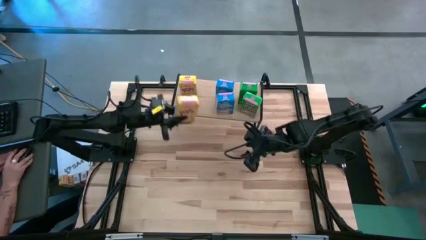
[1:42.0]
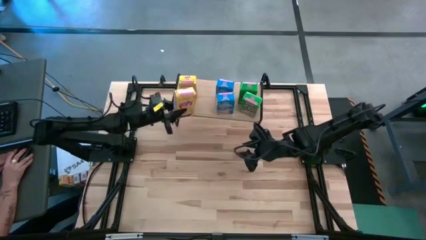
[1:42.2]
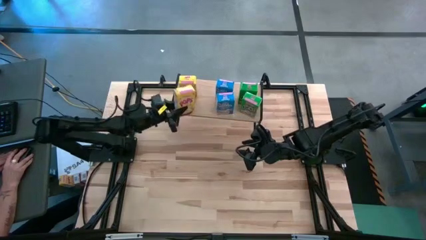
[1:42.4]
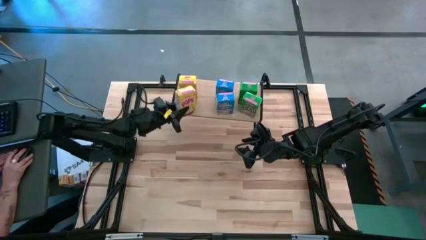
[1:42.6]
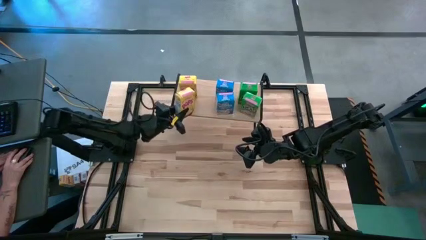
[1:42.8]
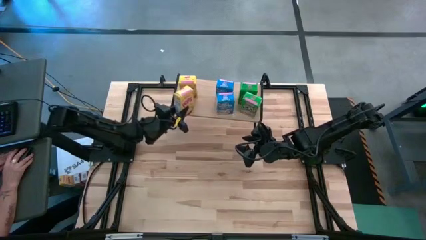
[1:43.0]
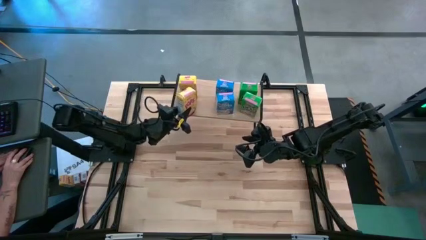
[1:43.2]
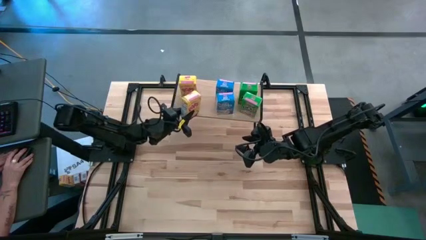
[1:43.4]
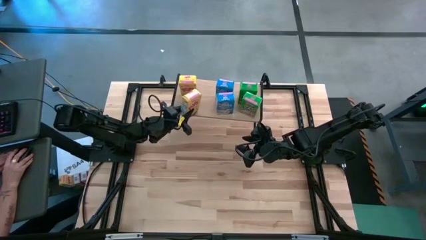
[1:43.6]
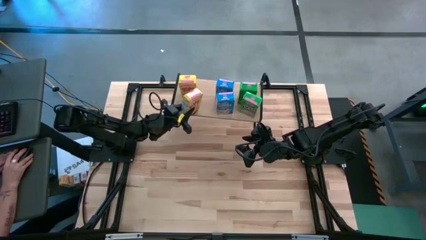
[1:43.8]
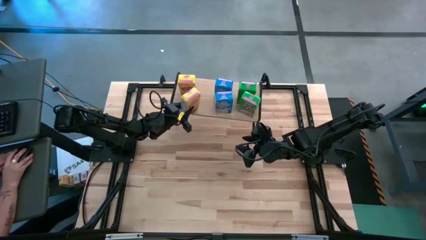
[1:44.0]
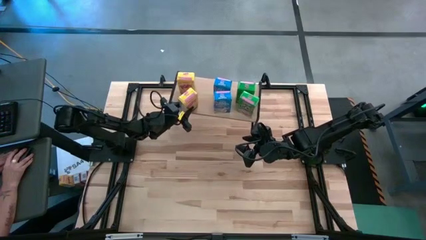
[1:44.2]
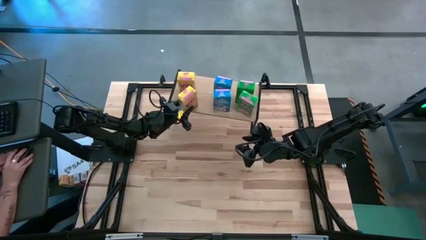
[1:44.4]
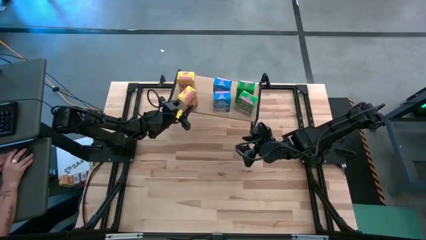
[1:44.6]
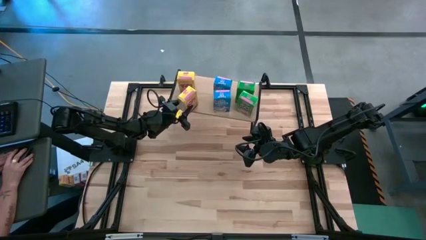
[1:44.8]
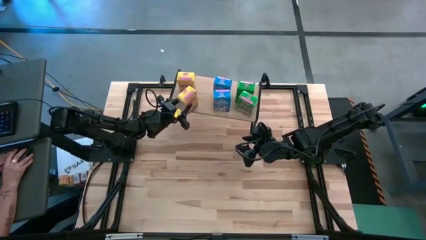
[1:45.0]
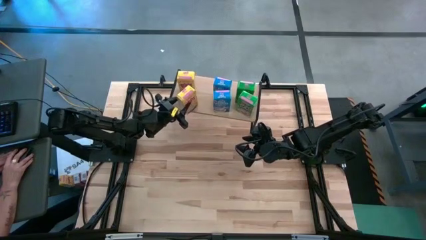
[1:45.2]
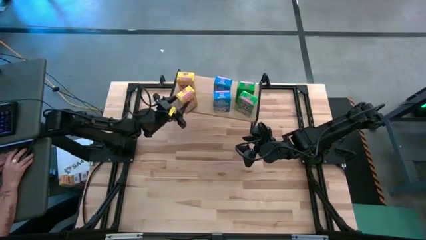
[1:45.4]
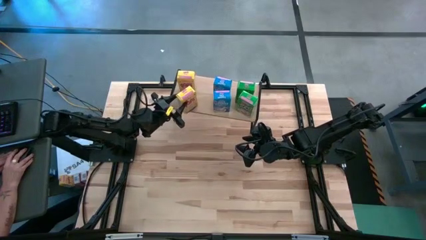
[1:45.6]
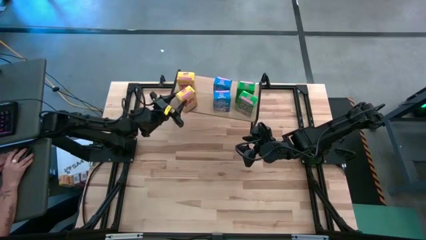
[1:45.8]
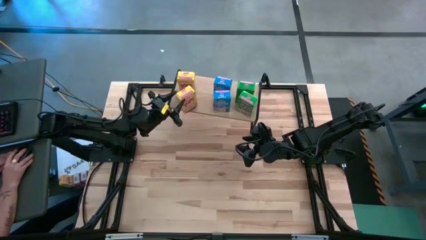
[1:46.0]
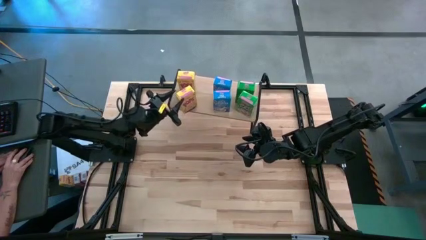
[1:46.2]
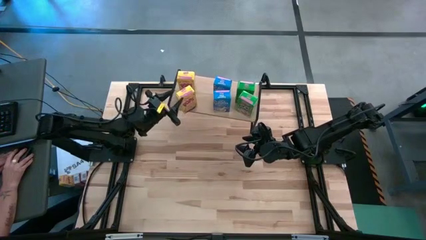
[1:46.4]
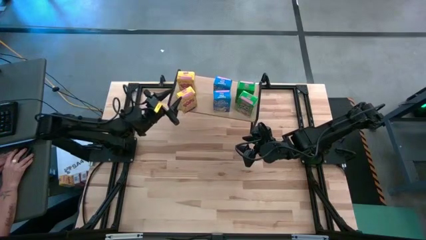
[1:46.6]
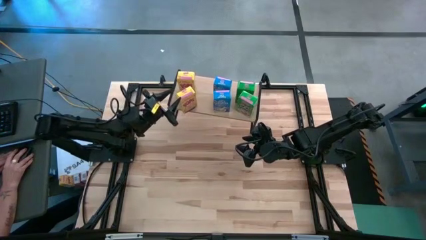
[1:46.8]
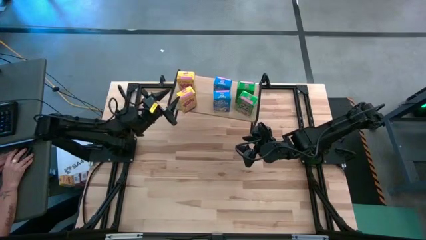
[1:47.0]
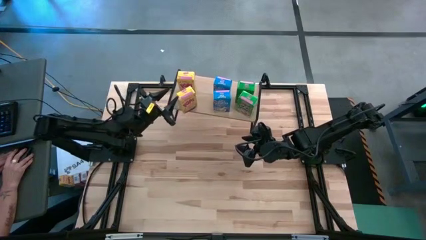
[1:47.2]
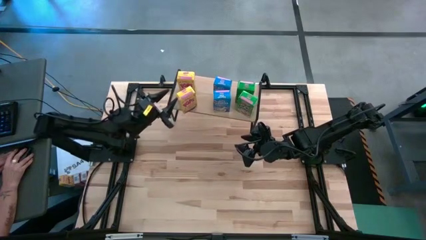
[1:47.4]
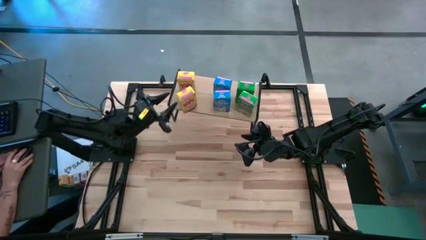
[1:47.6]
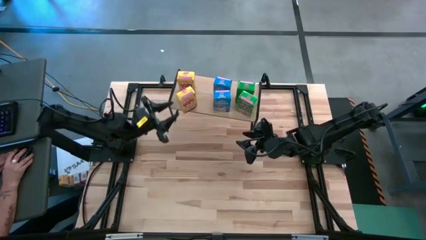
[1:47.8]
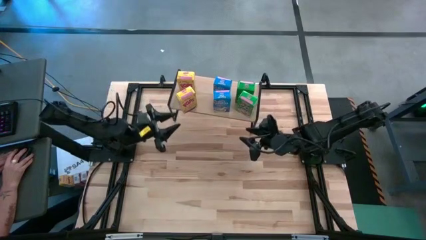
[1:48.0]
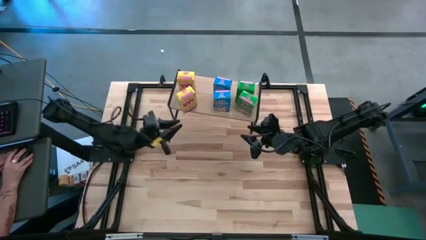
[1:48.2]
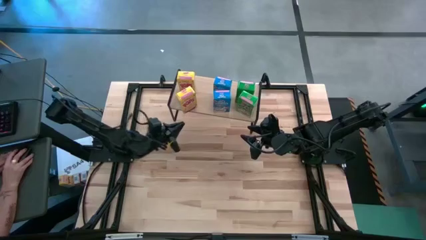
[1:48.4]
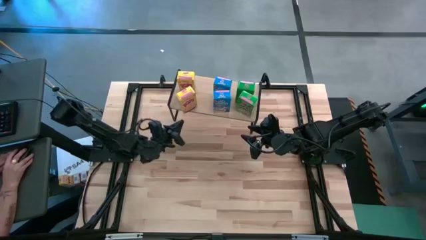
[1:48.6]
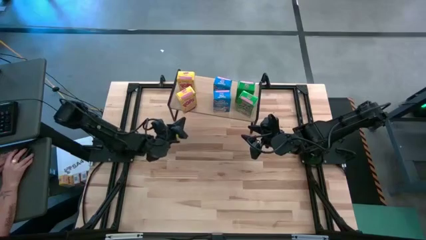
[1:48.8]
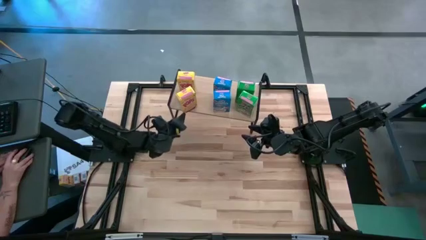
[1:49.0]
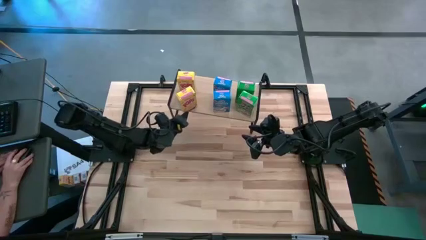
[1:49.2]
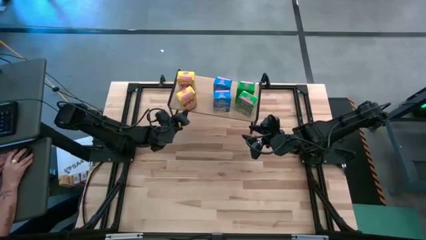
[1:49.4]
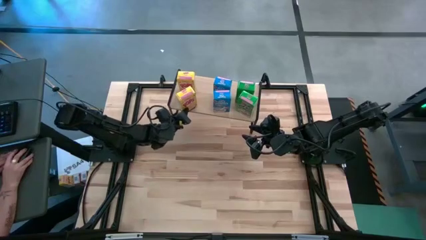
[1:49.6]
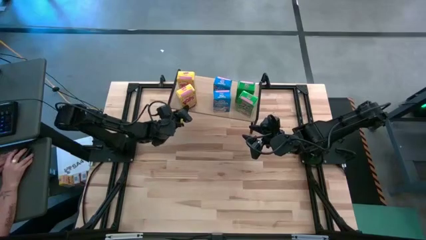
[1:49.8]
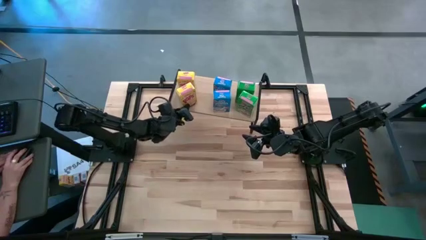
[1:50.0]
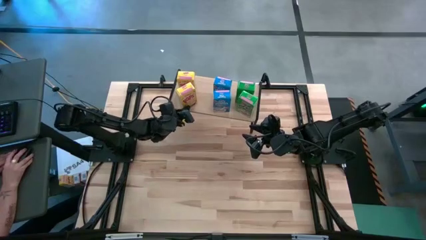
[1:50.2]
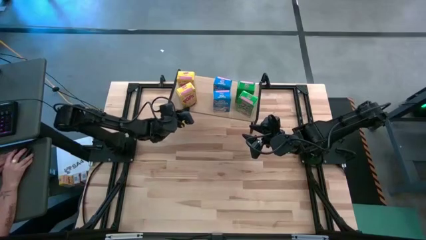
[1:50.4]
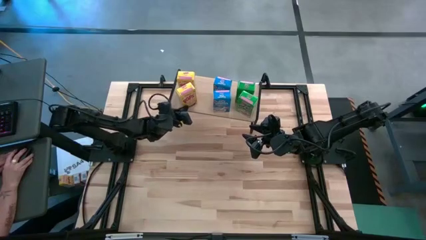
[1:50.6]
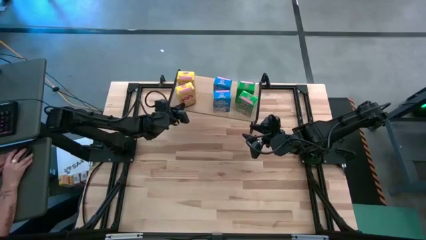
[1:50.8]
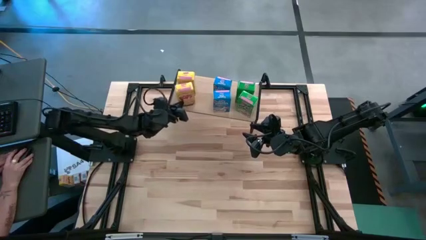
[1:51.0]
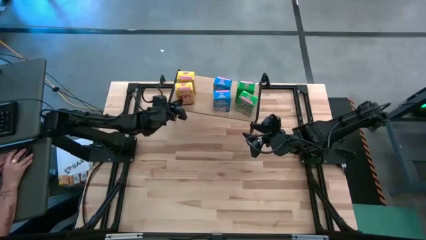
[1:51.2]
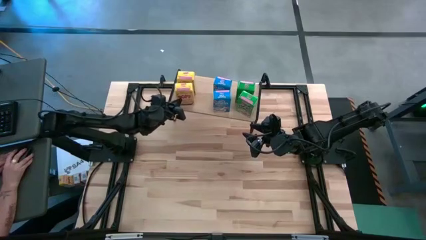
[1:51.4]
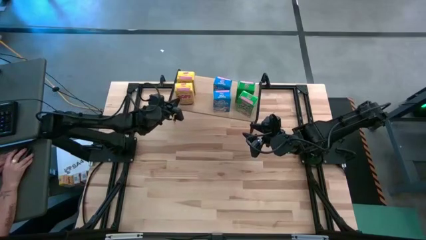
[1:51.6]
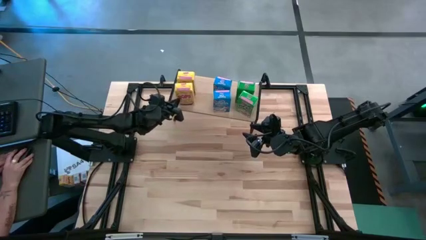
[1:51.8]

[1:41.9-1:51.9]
Task: Stack cereal on shelf
Put the yellow cereal box on the shelf aligned with the other yellow cereal box

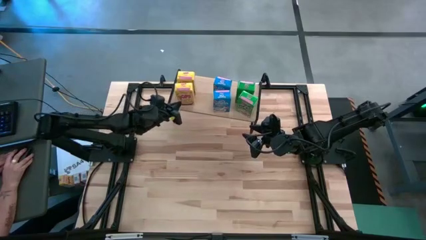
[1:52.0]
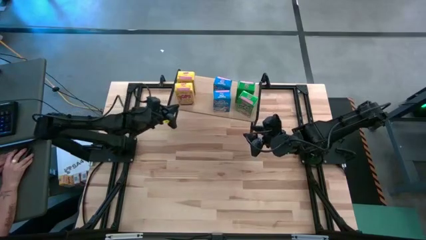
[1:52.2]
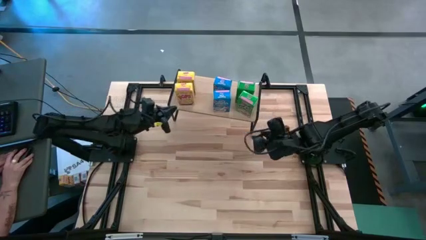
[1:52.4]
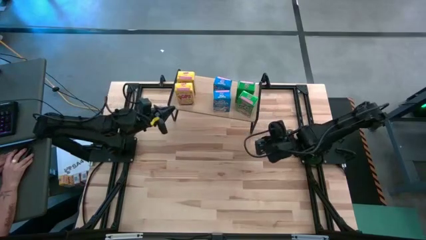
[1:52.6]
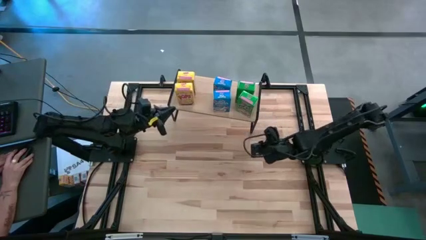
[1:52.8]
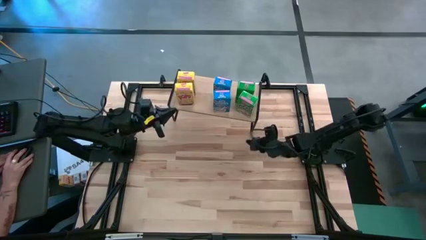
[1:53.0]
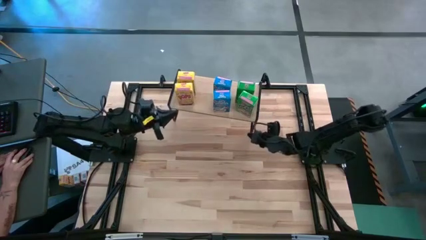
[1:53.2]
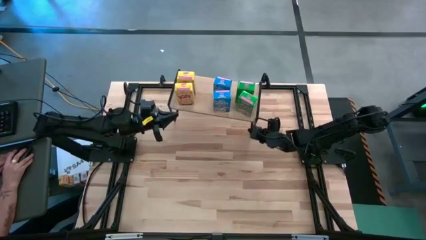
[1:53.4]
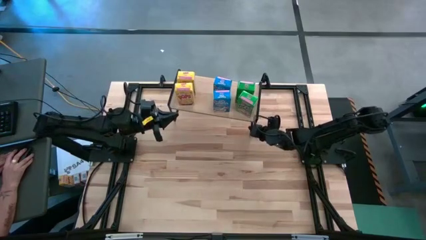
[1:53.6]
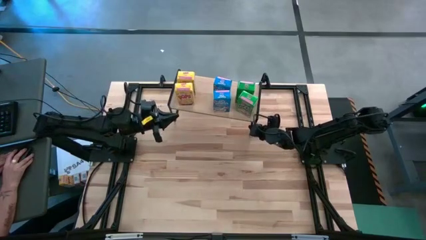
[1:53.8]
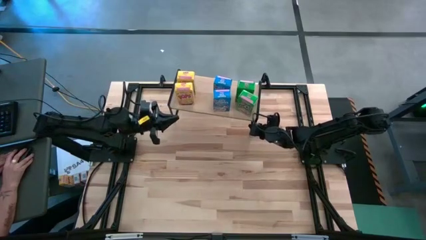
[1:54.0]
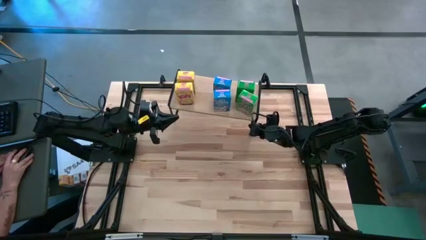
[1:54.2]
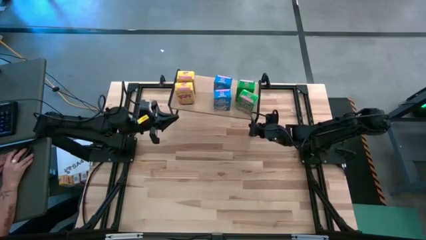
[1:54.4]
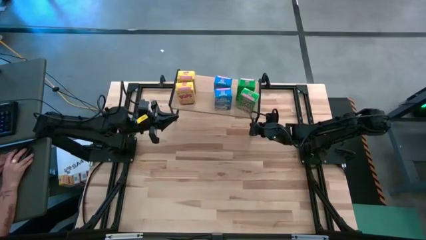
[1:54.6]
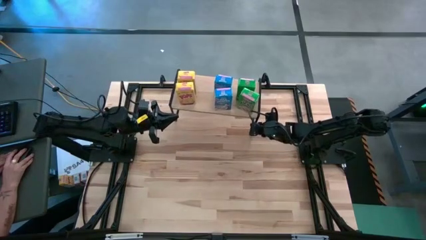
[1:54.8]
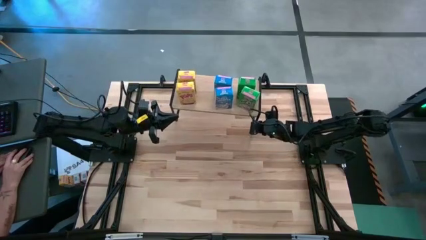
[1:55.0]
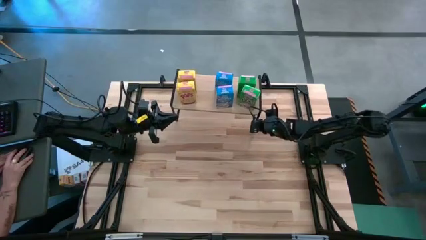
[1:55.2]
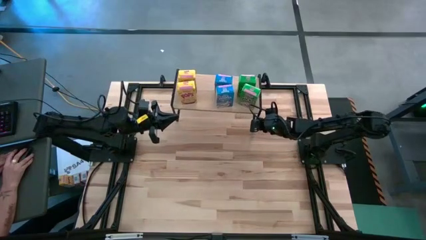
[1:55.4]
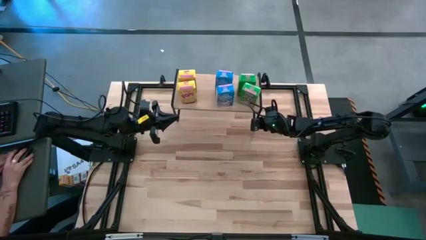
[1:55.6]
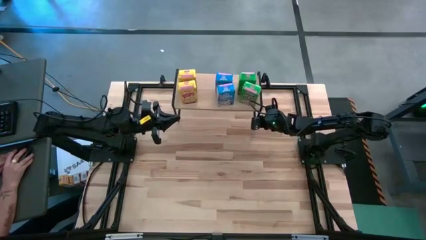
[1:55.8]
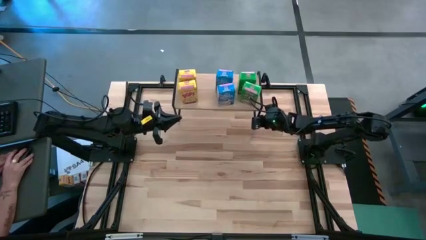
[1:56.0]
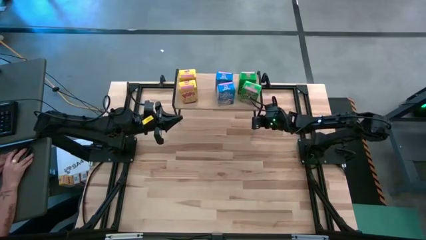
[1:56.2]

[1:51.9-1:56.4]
Adjust the shelf on the table

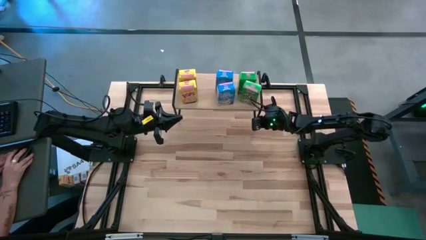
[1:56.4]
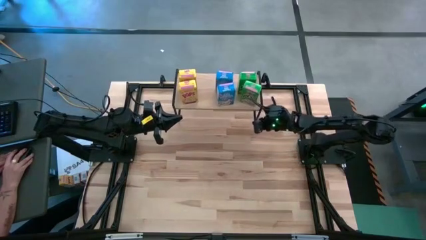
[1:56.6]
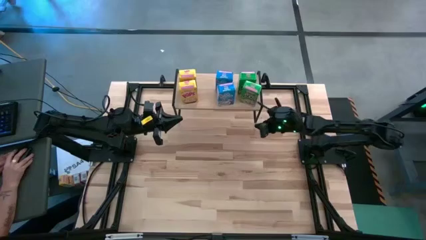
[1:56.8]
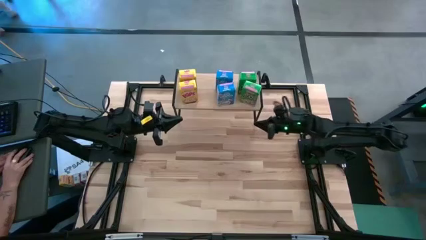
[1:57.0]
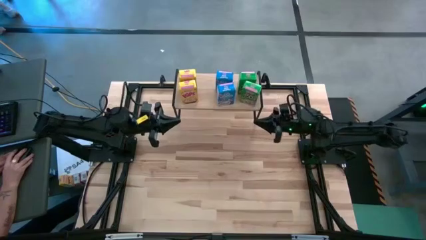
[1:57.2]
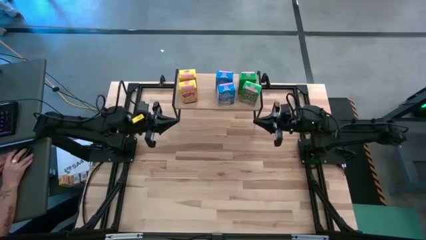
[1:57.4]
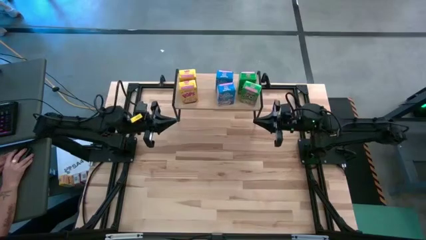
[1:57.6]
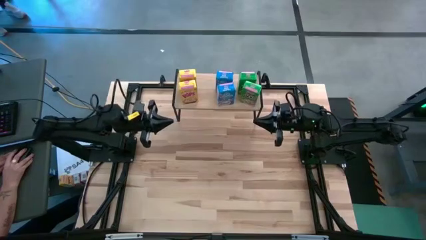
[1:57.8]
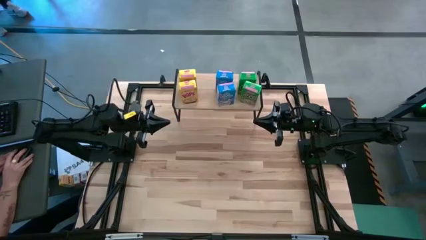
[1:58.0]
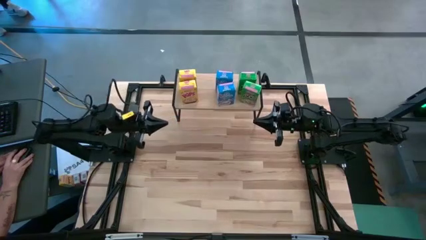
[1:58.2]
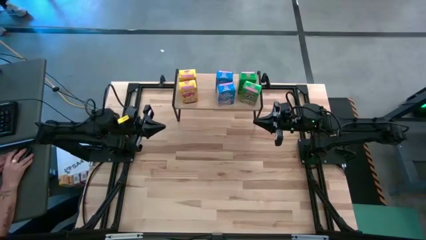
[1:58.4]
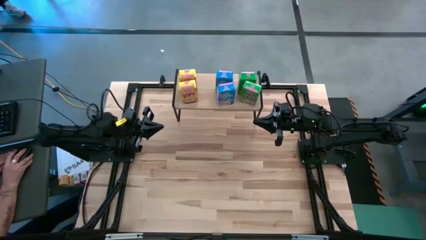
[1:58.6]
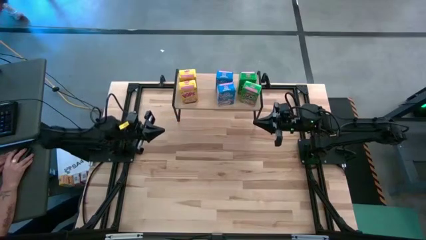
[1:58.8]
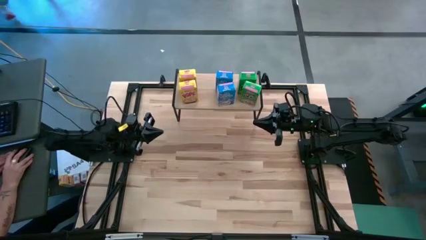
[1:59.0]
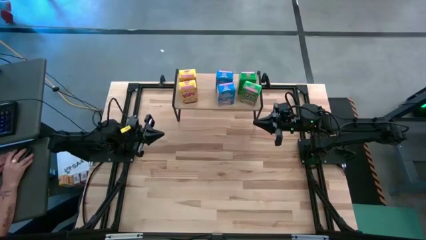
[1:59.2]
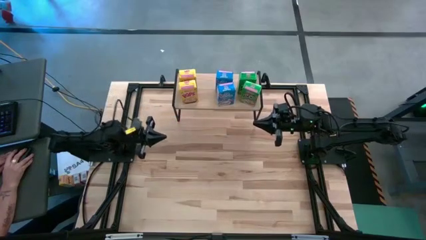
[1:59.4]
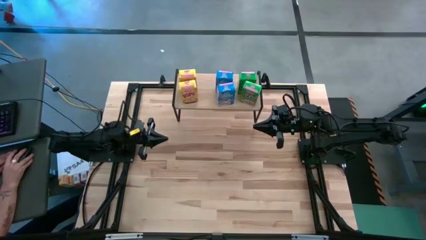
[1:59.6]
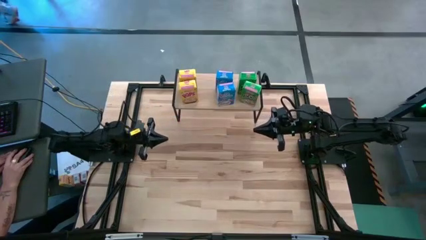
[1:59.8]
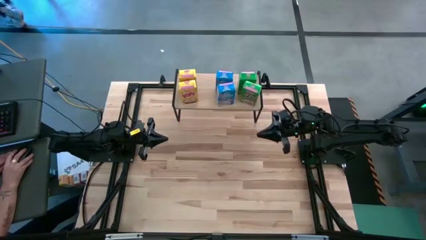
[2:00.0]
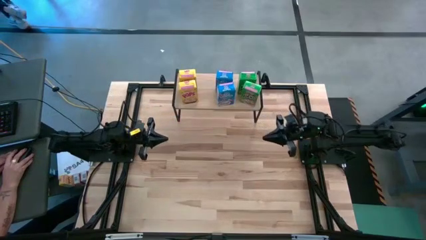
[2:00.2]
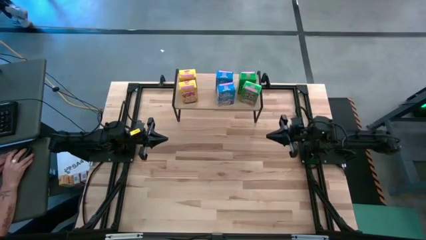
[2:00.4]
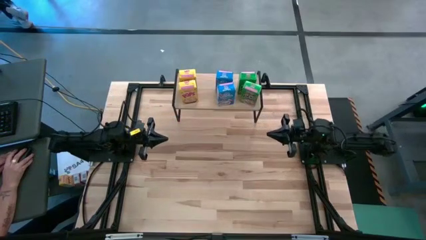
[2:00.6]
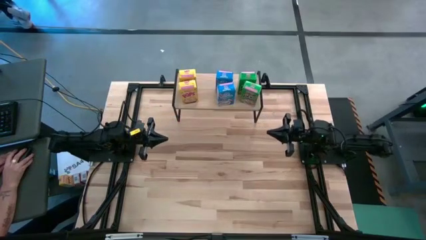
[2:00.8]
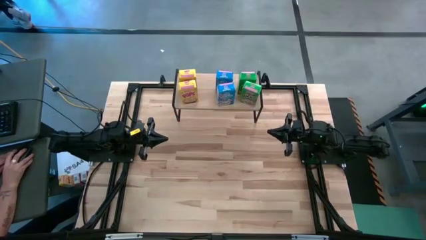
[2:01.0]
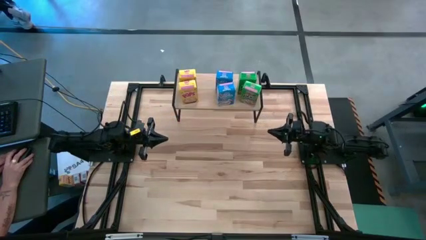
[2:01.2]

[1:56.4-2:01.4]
Return to Home Position
